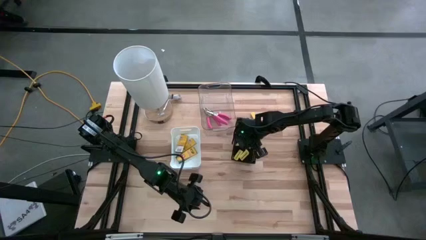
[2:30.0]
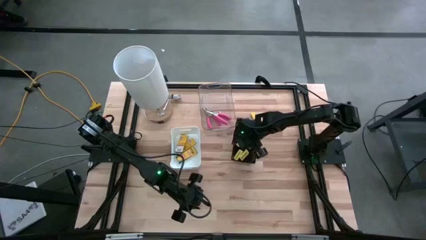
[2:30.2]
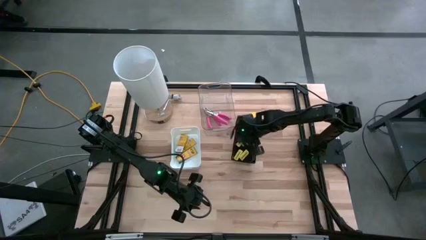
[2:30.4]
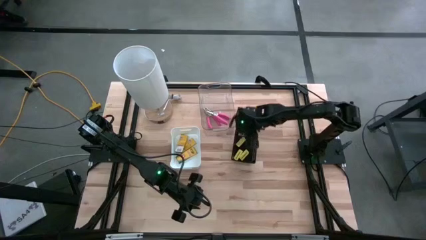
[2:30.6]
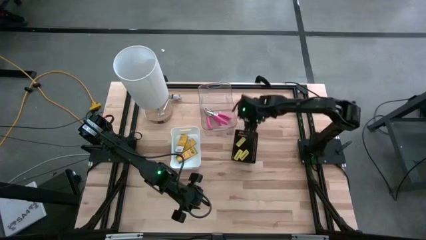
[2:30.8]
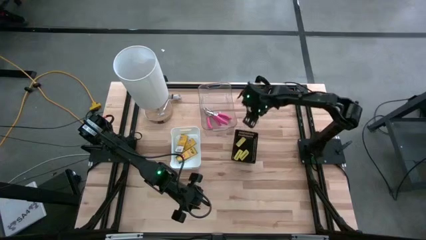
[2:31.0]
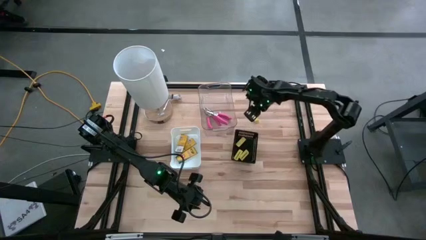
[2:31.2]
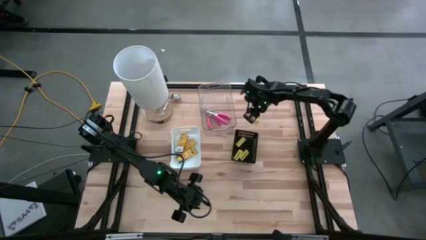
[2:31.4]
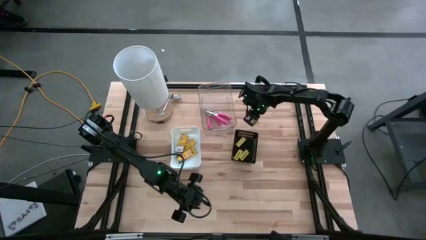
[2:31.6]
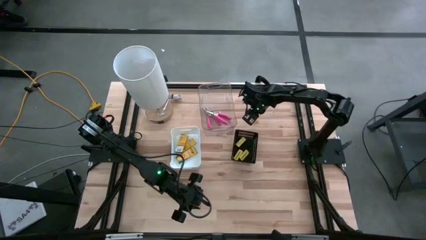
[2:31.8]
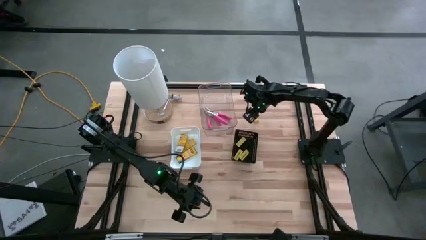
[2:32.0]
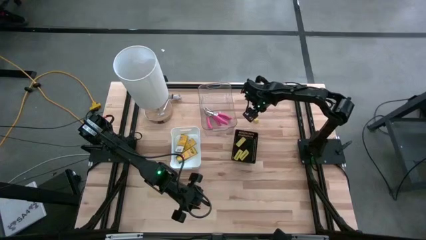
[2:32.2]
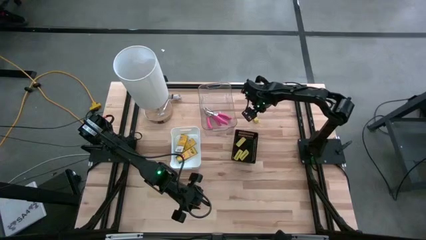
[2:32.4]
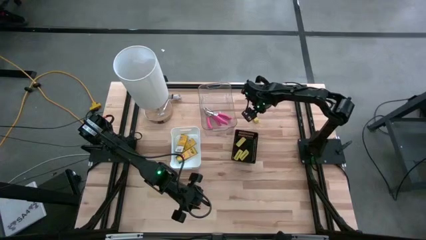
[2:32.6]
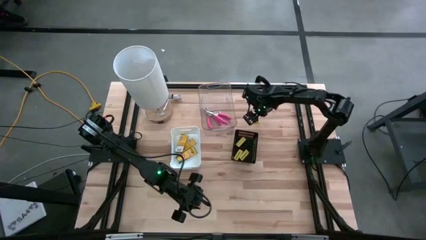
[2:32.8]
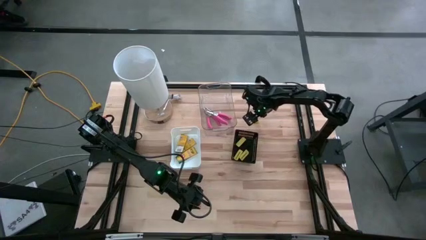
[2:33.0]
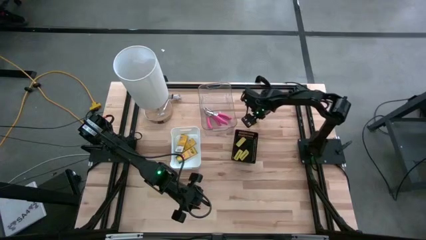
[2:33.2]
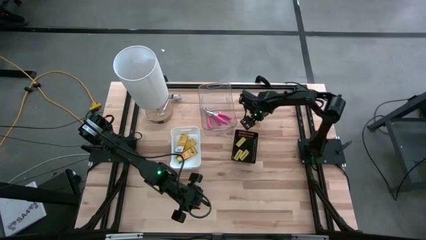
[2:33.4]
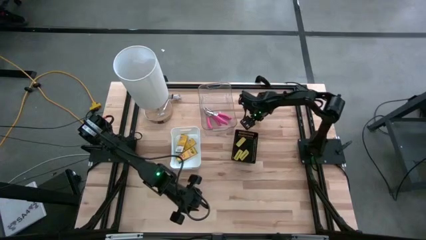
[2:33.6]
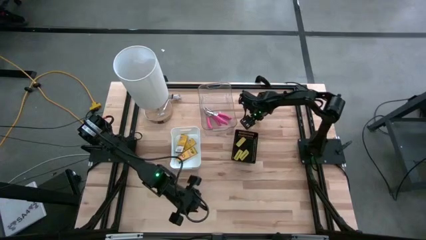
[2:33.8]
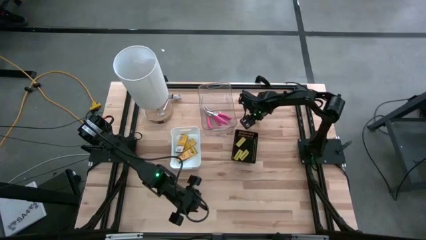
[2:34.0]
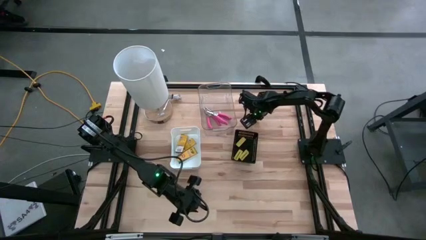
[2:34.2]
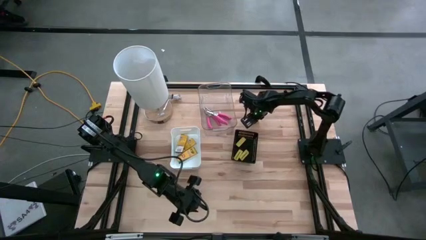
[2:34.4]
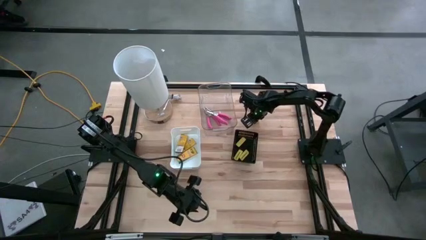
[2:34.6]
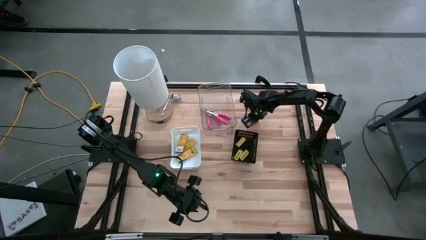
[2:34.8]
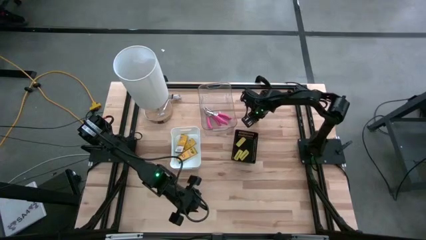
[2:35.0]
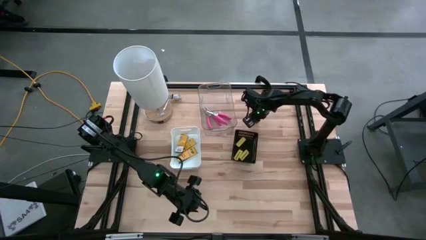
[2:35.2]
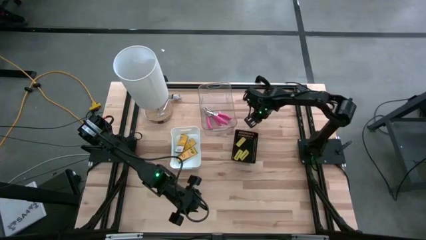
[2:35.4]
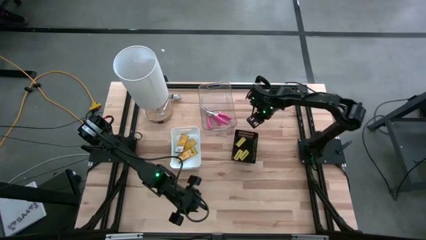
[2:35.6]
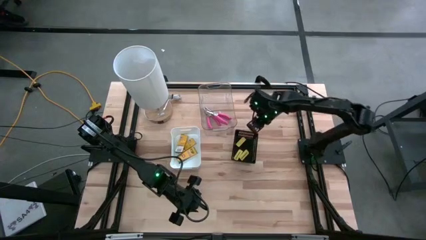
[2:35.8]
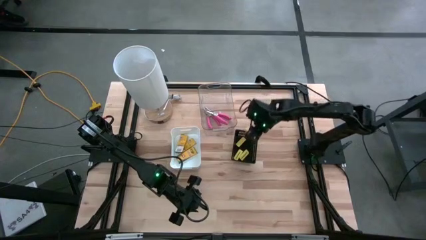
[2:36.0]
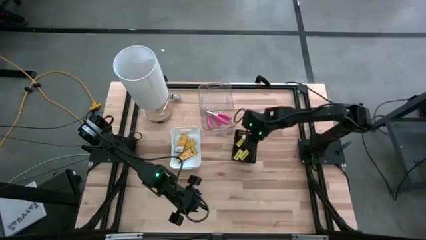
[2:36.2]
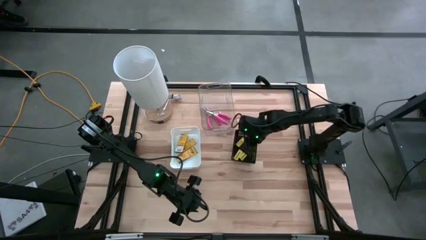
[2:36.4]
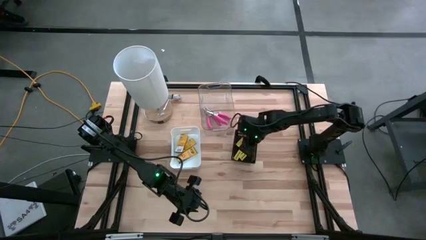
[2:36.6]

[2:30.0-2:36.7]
Task: Pick & Place School Supplies
Put the yellow eraser into the black bin

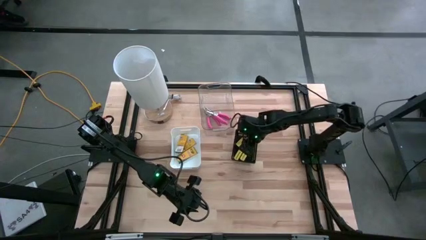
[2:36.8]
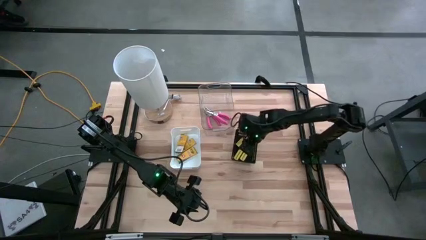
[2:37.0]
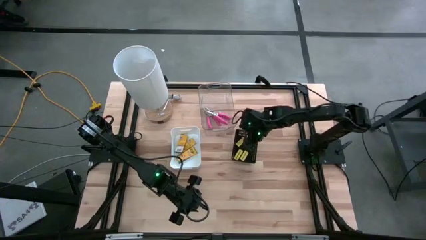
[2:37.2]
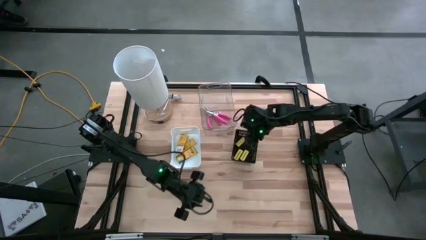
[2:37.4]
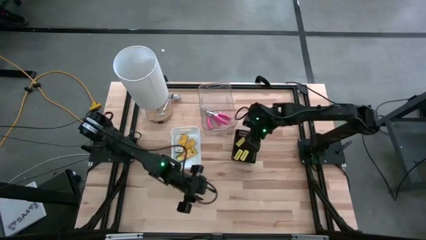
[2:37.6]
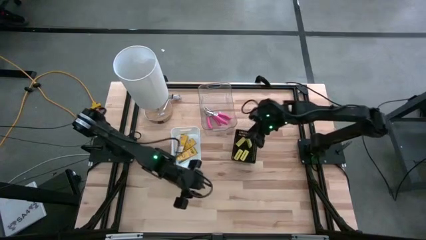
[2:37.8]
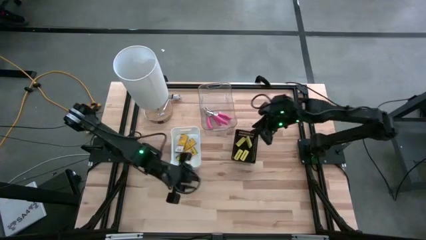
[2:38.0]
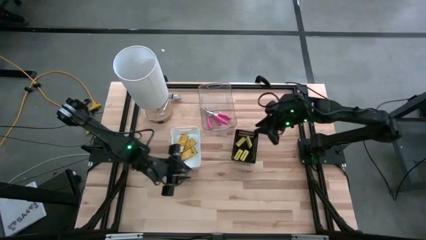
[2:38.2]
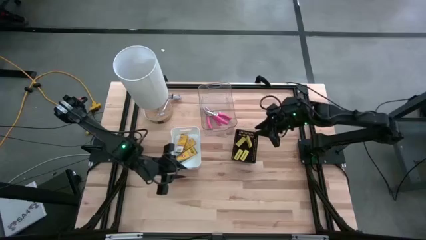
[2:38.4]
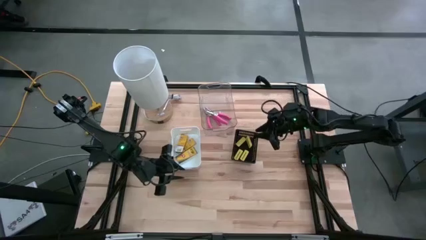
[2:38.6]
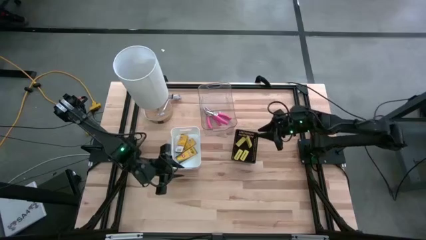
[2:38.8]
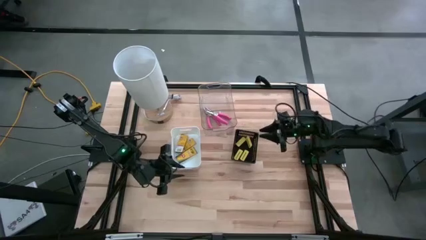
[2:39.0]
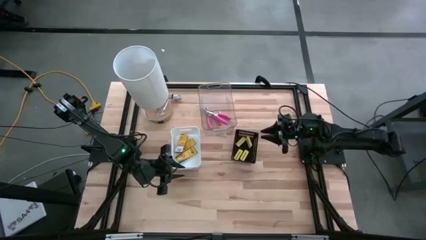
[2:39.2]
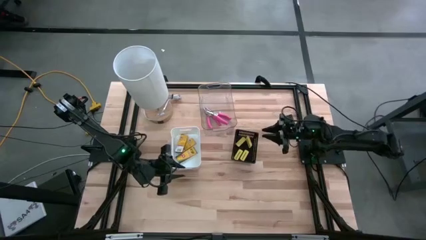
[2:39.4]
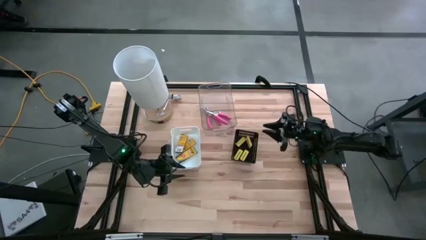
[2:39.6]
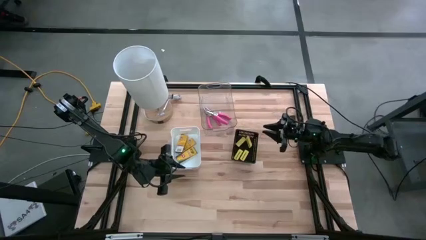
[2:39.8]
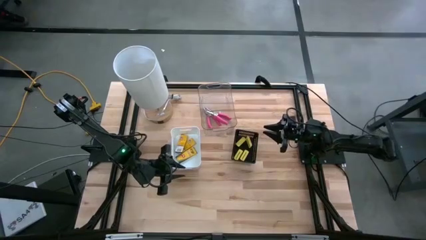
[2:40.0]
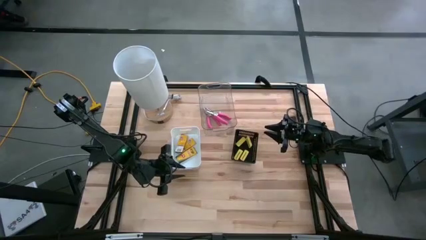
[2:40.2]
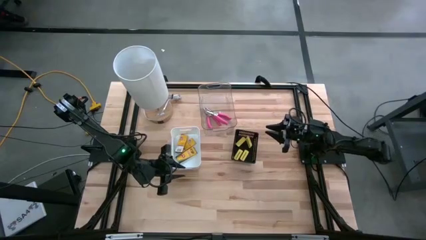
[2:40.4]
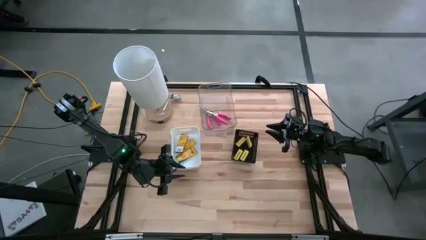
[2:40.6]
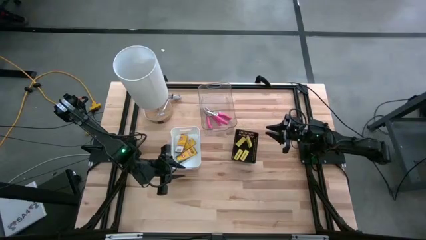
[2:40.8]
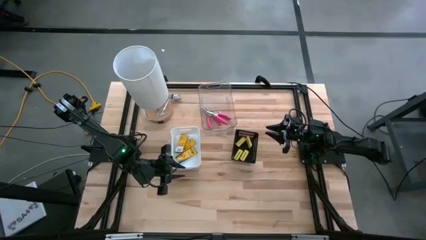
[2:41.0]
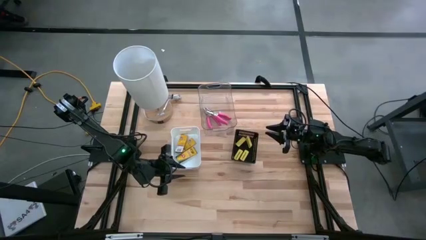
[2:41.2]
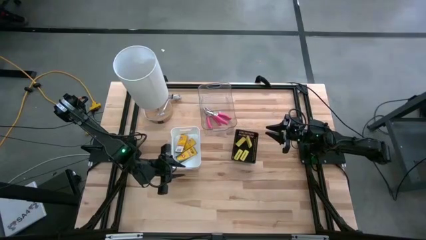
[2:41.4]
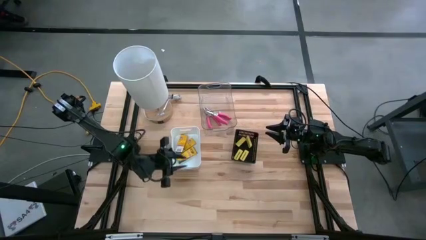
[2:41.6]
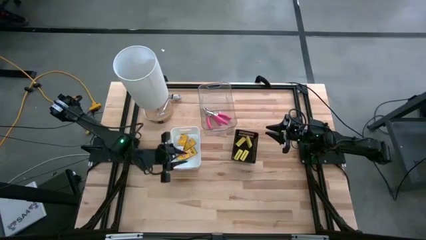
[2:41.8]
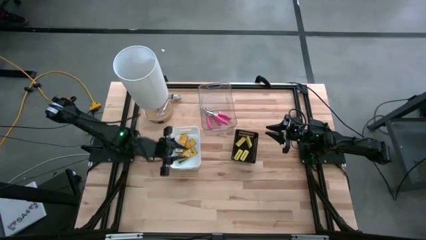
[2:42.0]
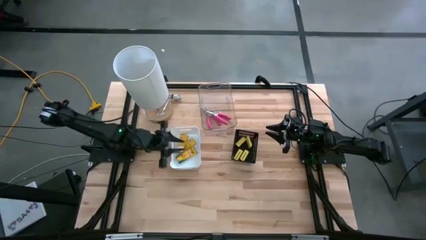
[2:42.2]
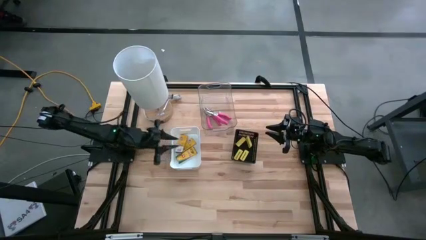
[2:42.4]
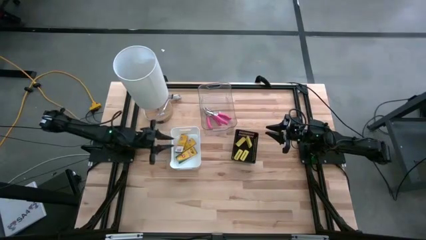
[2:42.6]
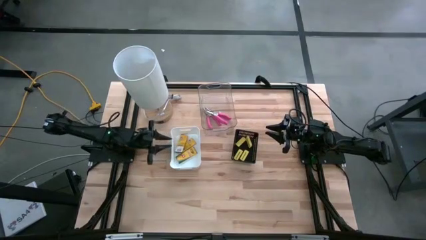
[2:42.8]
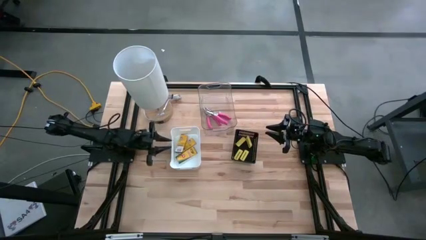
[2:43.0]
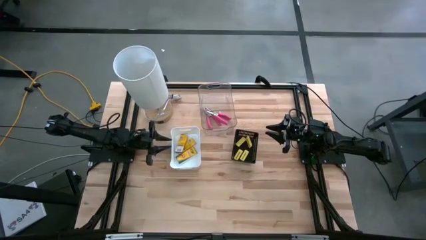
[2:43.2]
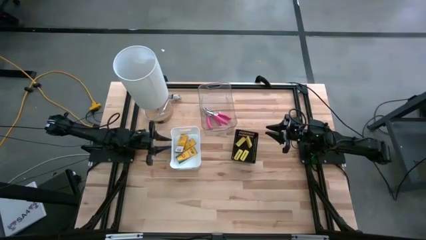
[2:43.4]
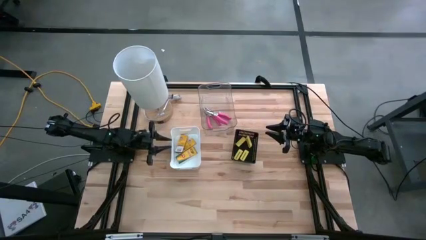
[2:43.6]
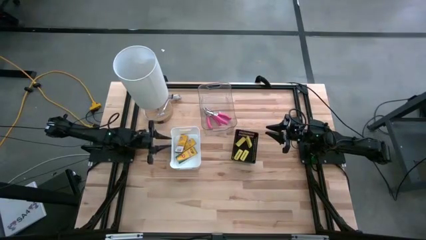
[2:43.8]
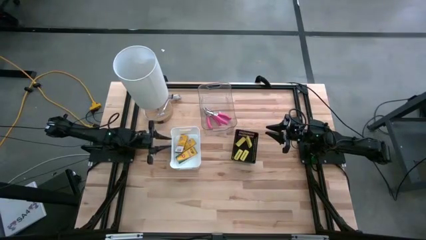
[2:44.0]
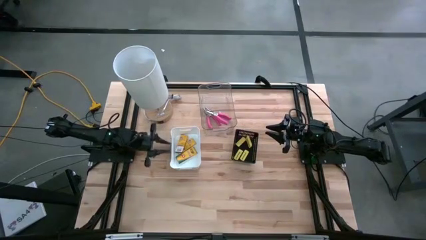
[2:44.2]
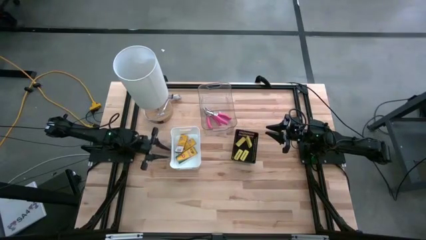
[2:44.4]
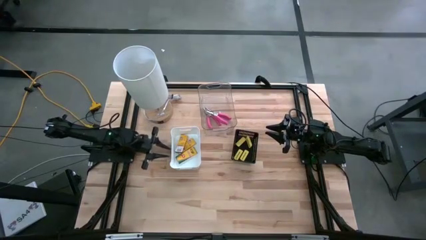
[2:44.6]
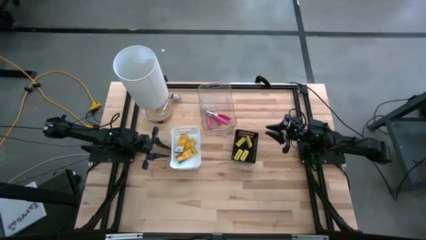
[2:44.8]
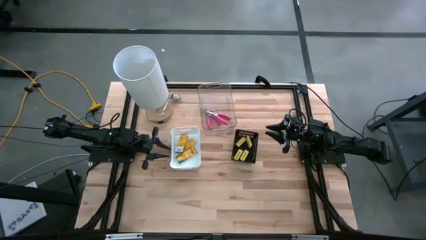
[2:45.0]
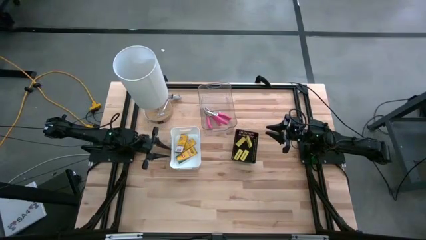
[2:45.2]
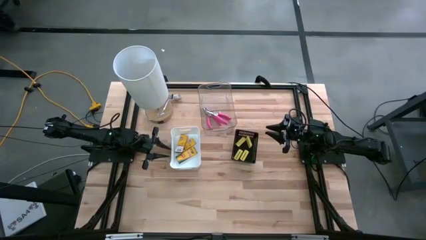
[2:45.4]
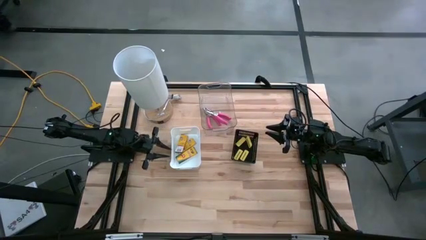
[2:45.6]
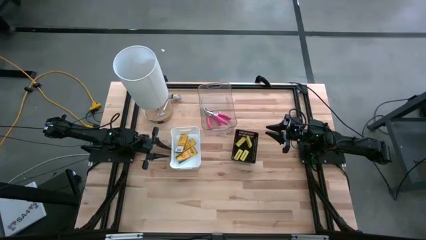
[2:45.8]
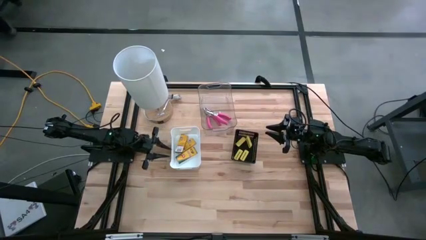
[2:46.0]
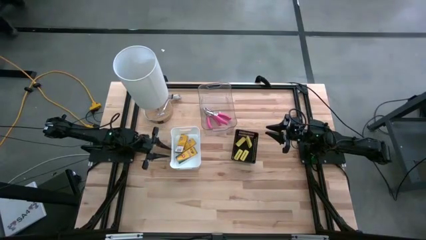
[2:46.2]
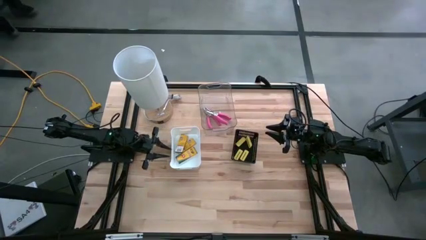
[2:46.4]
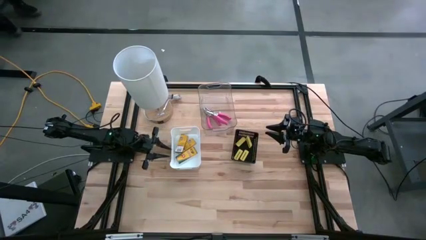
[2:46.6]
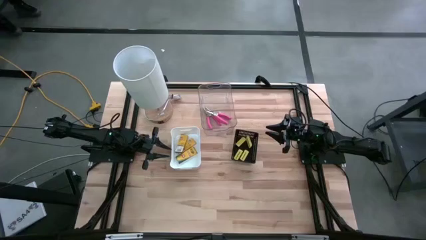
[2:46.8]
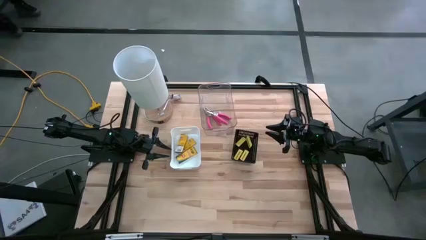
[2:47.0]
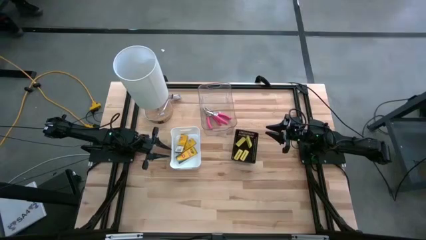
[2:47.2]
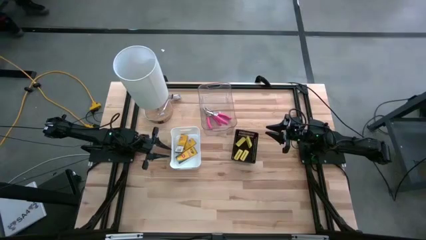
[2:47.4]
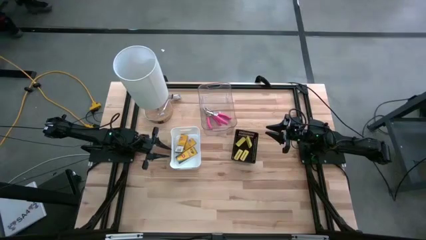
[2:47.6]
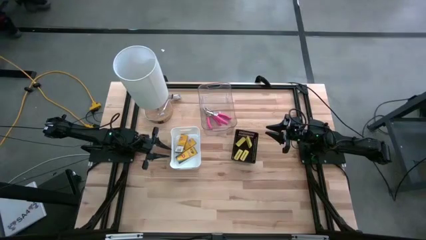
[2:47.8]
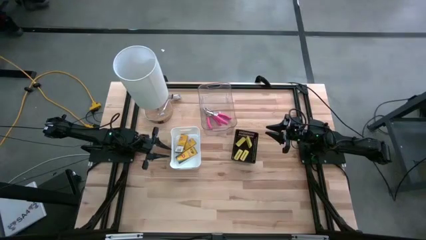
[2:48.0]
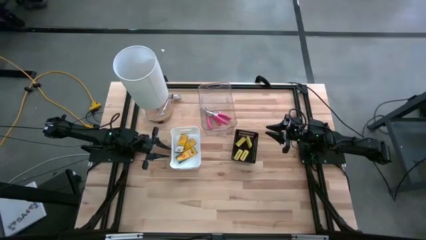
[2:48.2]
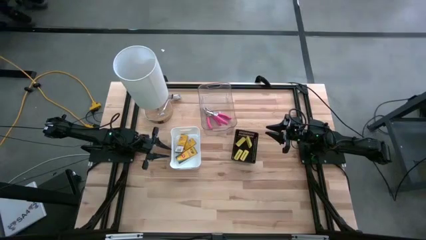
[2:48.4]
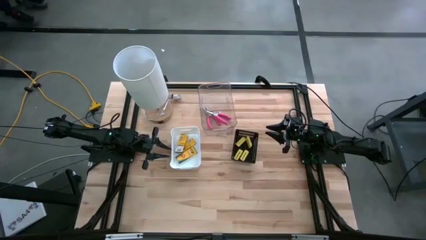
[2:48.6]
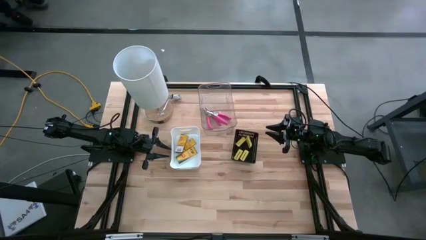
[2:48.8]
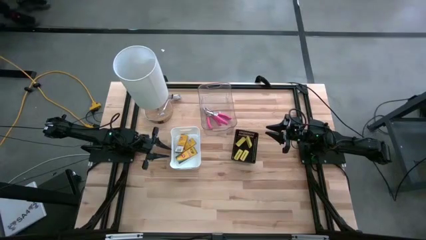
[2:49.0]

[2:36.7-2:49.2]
Return to Home Position
